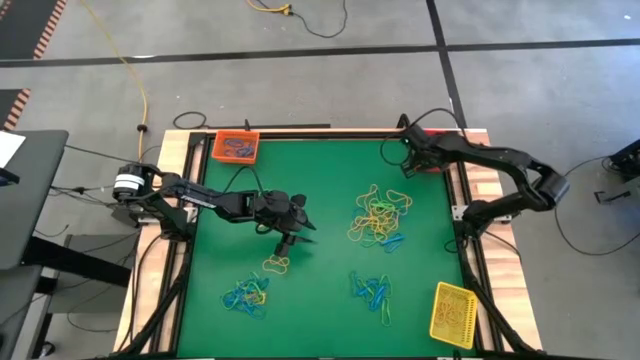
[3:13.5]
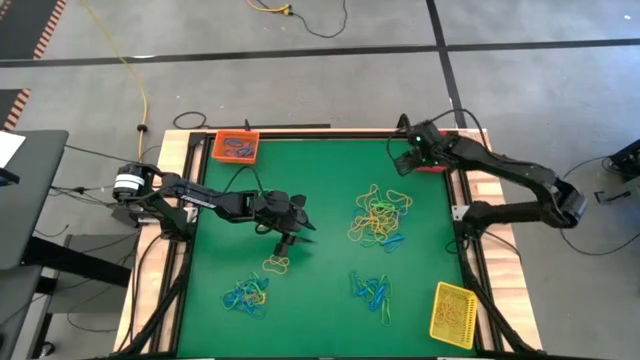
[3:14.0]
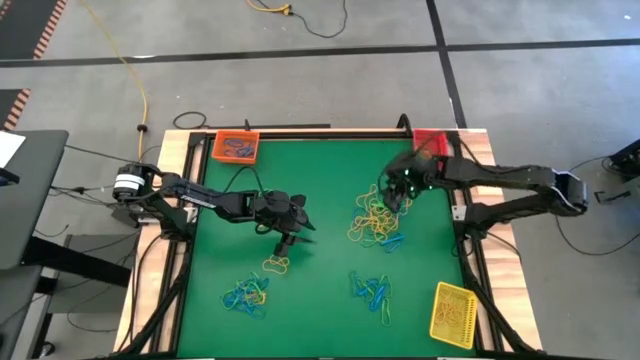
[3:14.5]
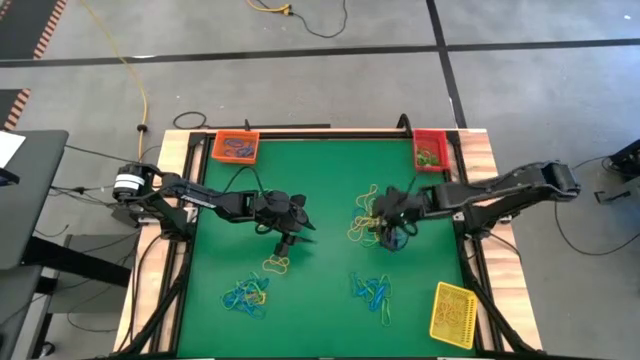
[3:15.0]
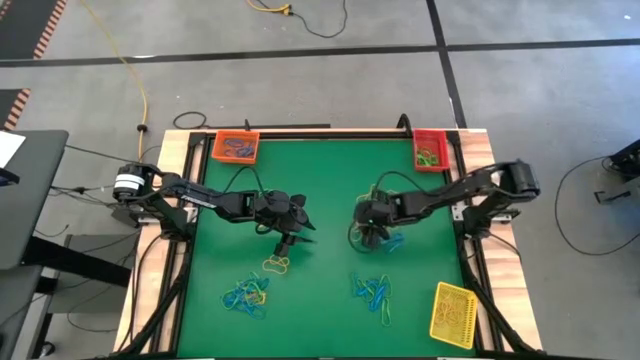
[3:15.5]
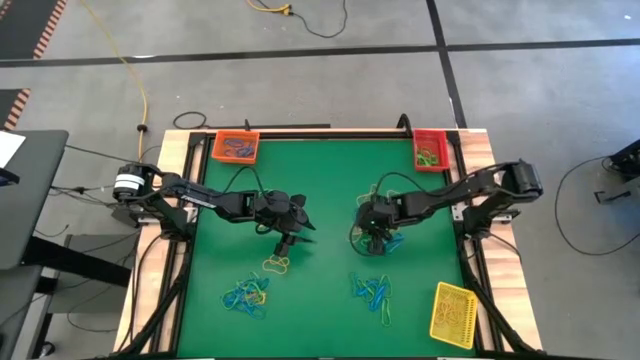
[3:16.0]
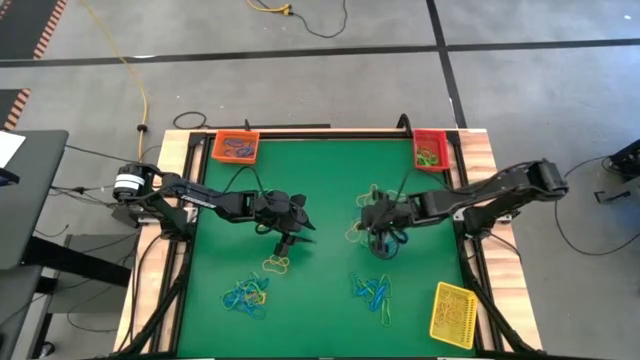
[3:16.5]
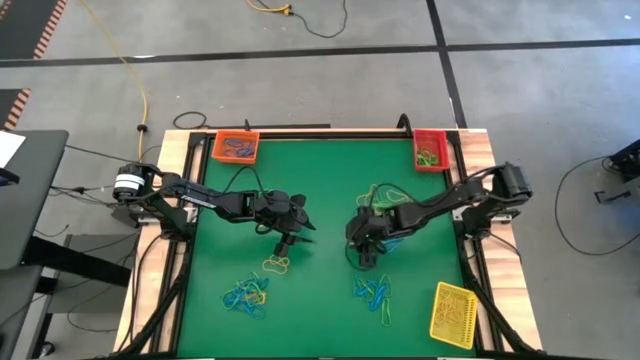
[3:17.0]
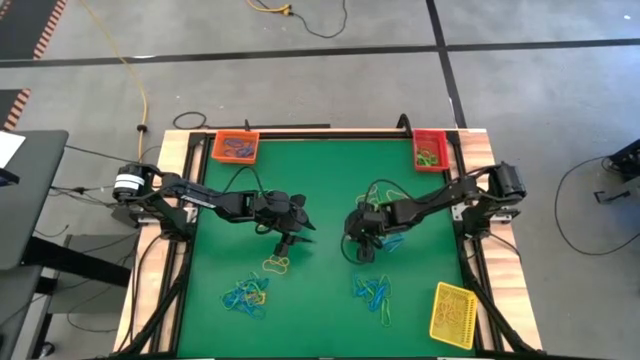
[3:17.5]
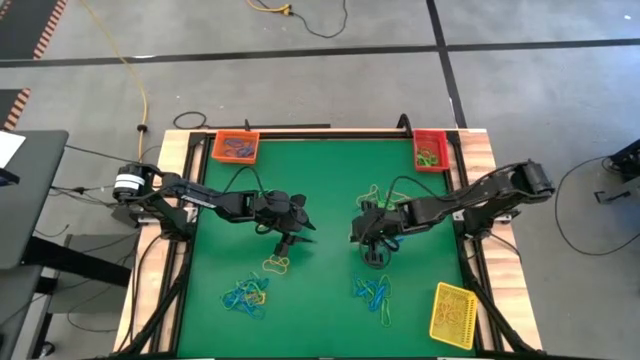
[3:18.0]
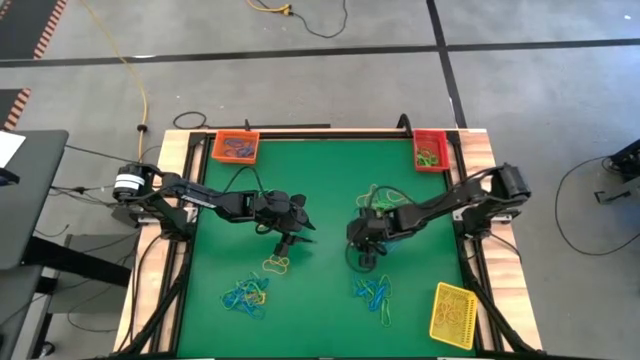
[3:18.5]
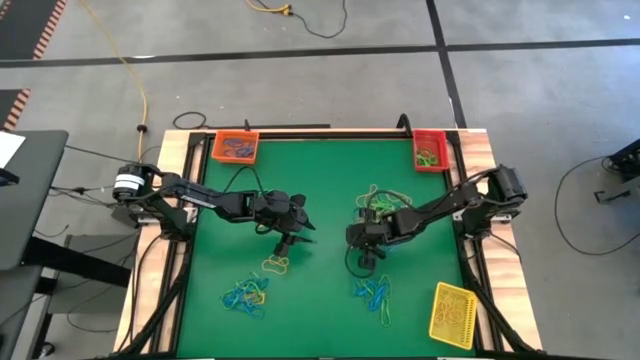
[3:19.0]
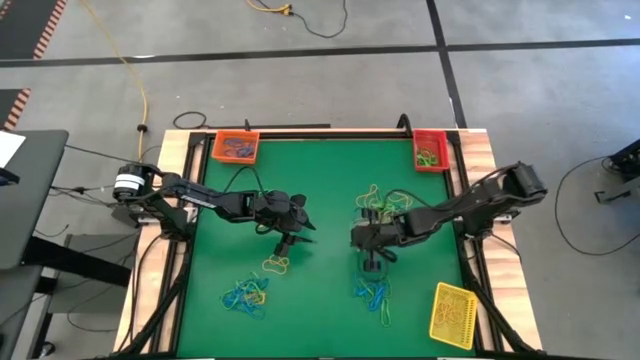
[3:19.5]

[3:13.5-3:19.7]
Task: Sort rubber bands into baskets
Put the top right yellow rubber band into the yellow bin

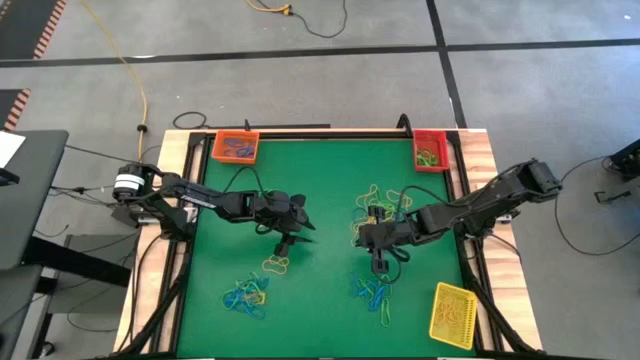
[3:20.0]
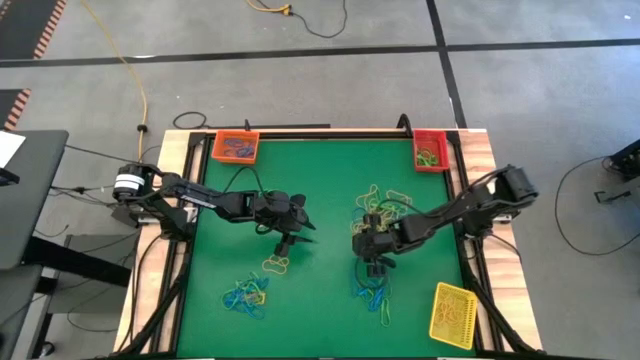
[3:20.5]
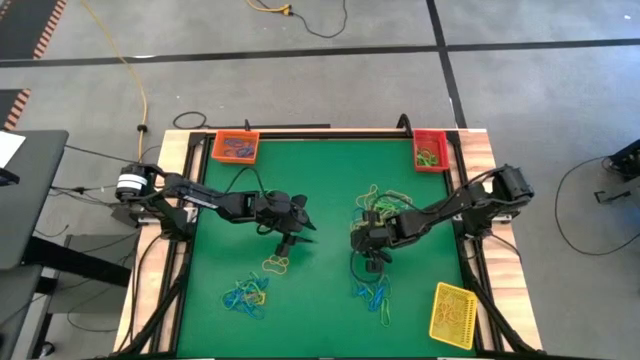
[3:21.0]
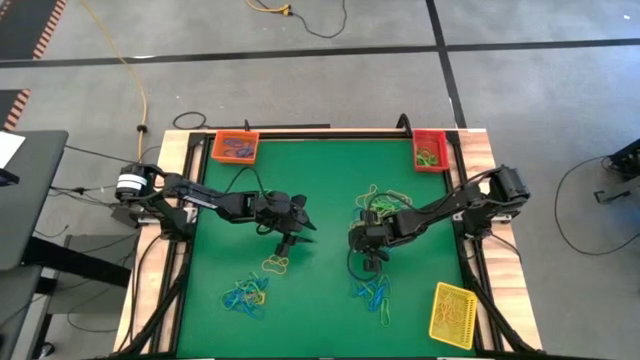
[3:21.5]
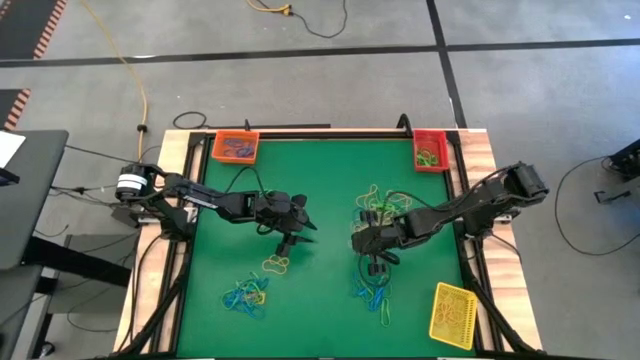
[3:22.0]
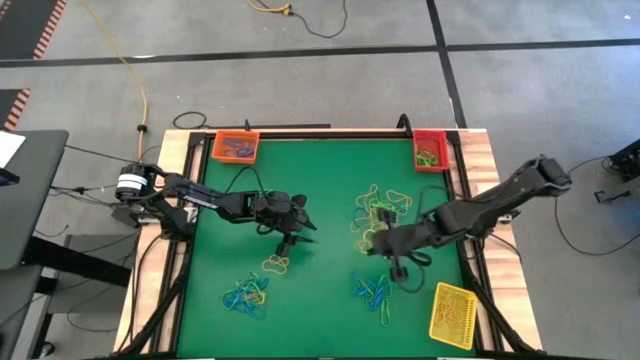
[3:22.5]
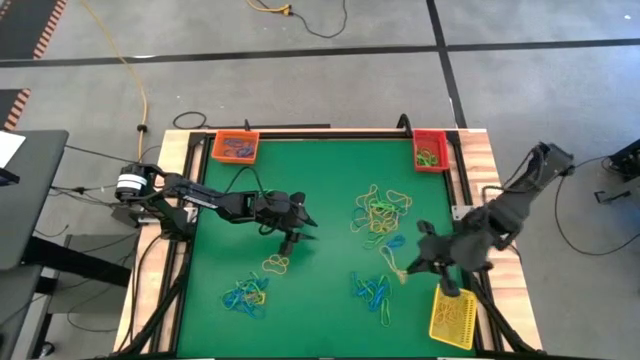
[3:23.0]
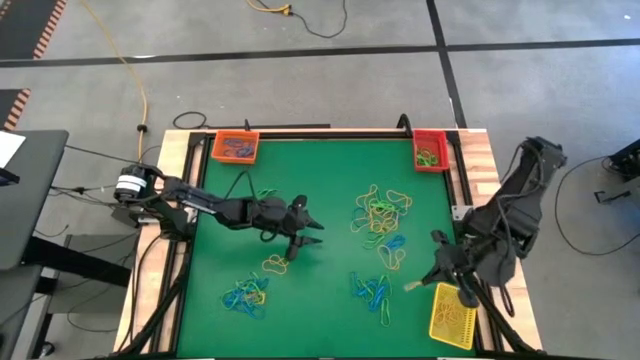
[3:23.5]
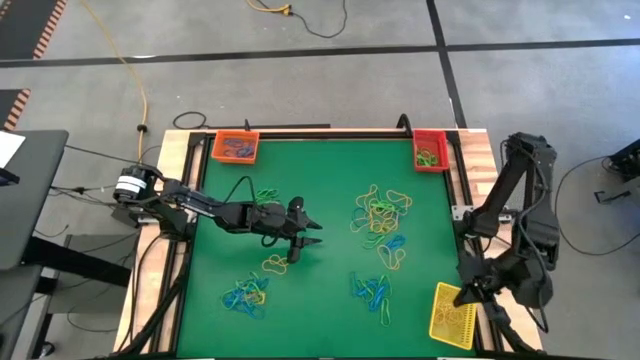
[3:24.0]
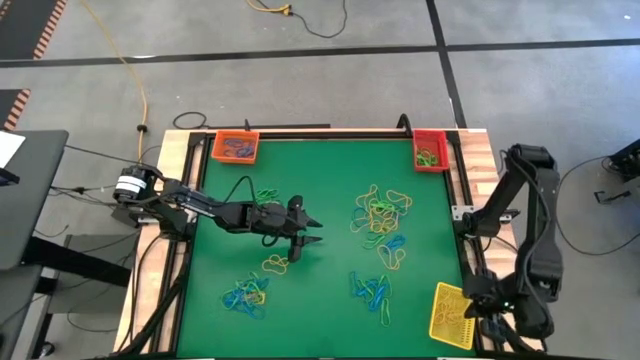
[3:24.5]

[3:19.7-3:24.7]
Put the top right yellow rubber band into the yellow bin

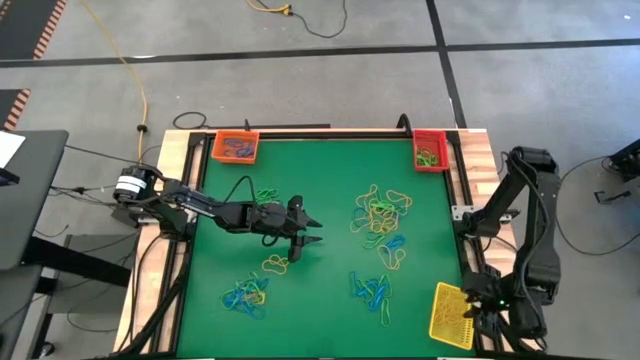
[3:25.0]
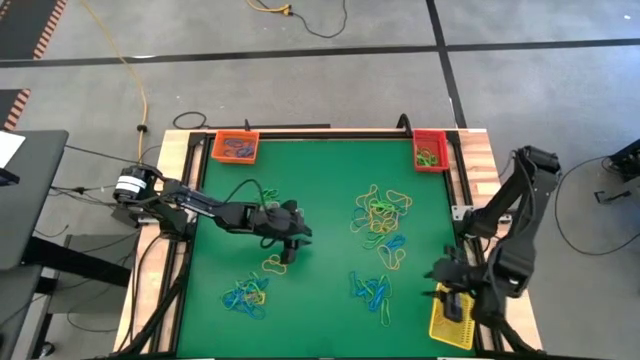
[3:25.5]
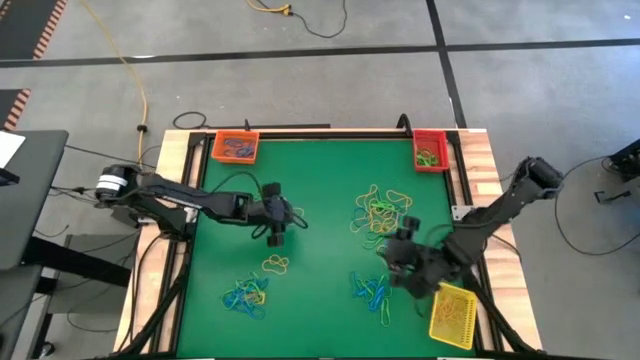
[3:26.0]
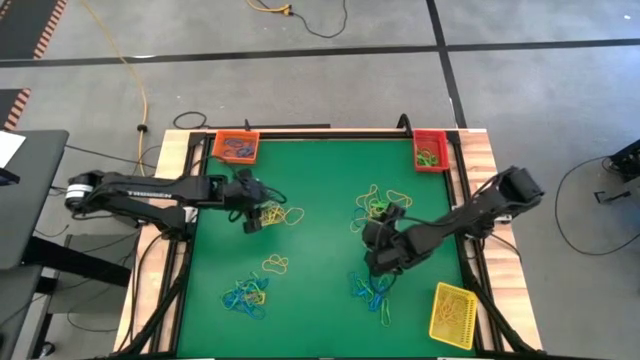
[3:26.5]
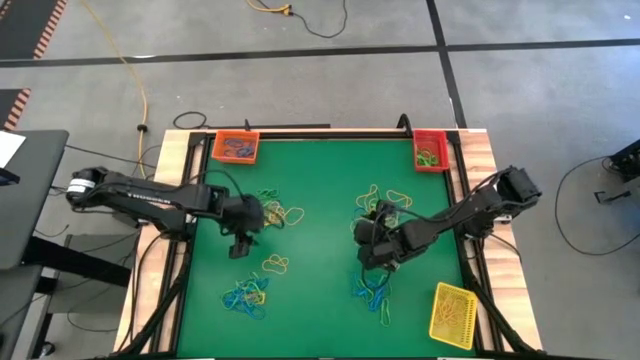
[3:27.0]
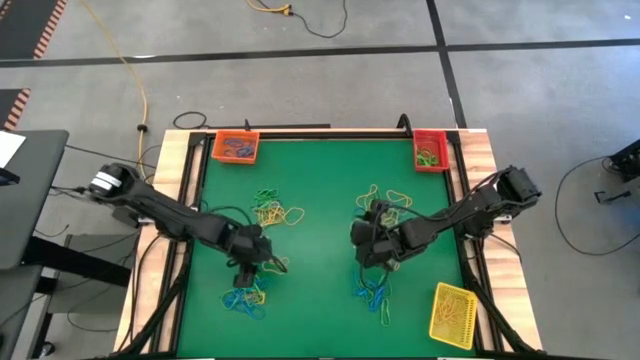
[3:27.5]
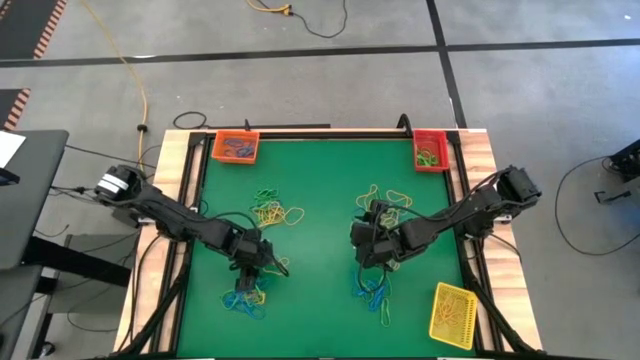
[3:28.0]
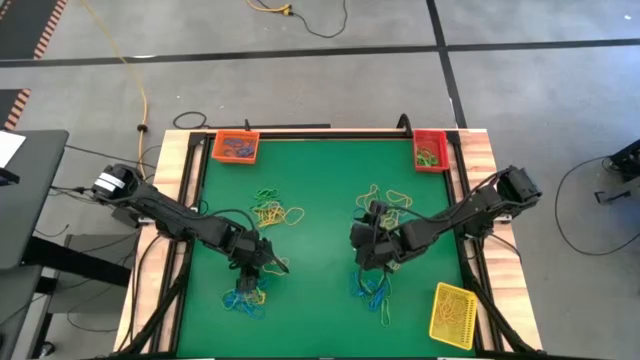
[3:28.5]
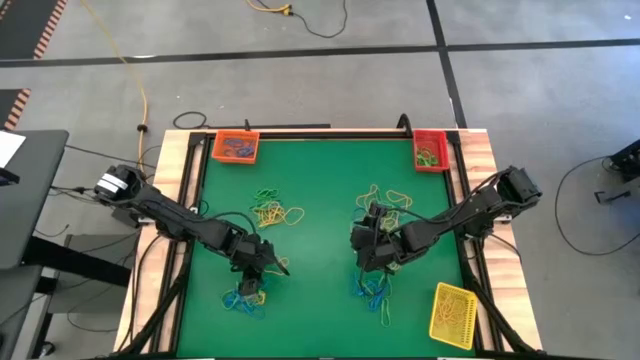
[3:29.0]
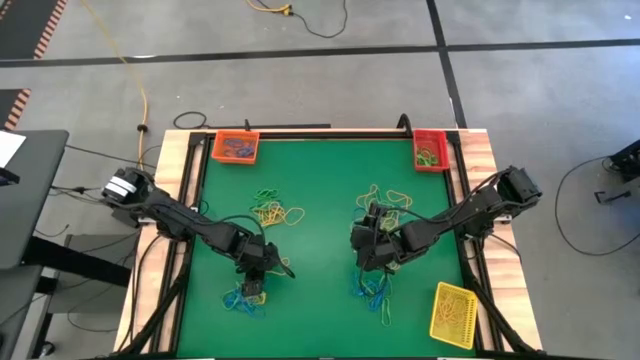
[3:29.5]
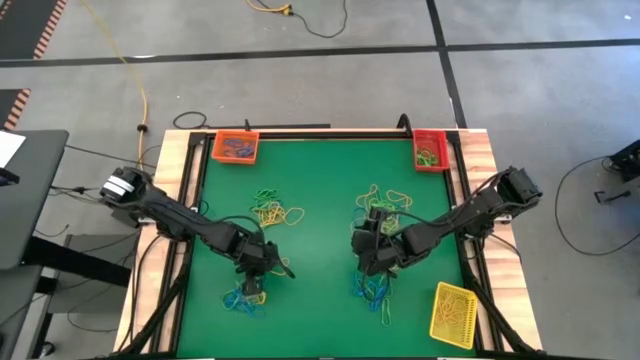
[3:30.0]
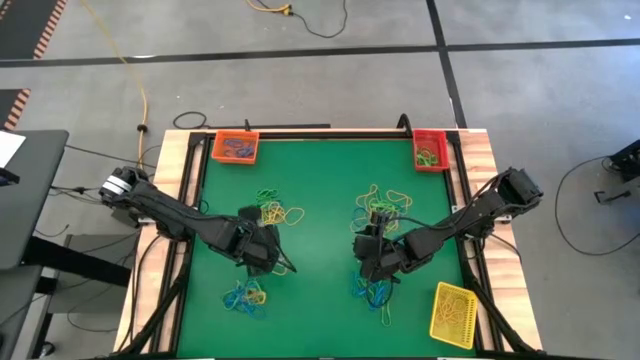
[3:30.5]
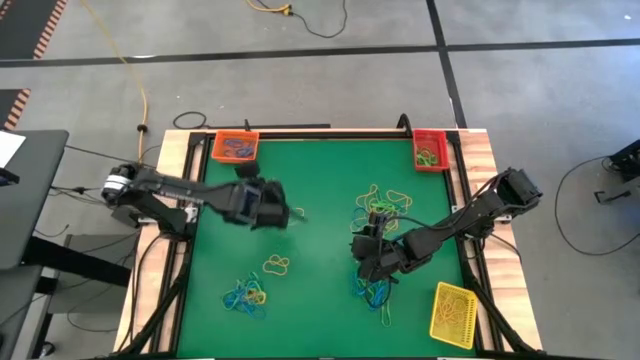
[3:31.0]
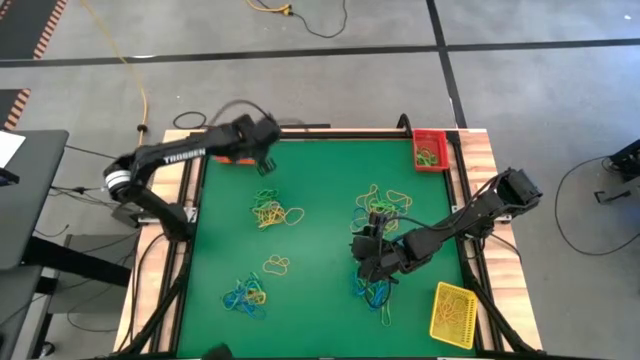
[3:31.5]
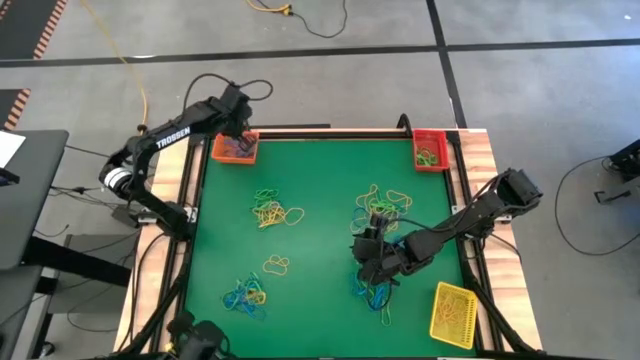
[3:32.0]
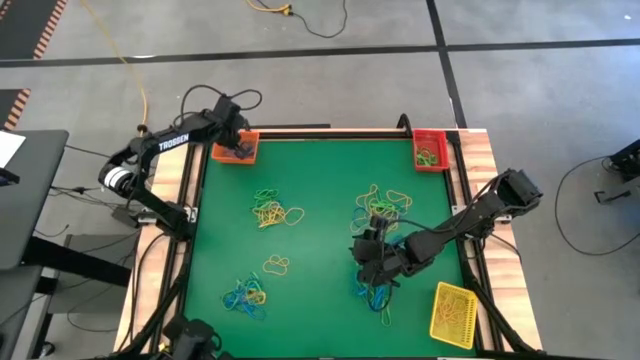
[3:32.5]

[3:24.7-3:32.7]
Put the bottom left blue rubber band into the orange bin
